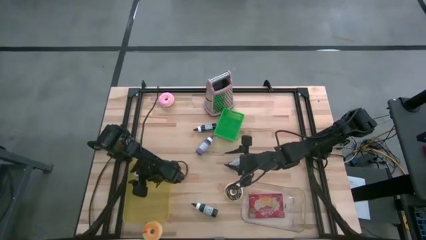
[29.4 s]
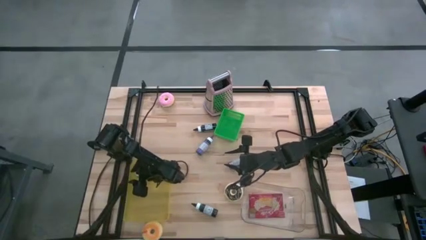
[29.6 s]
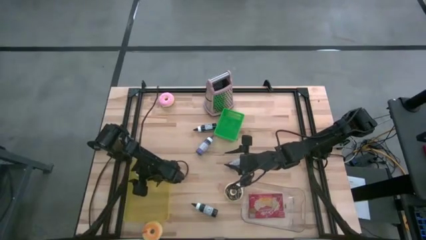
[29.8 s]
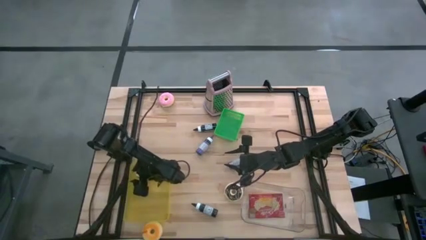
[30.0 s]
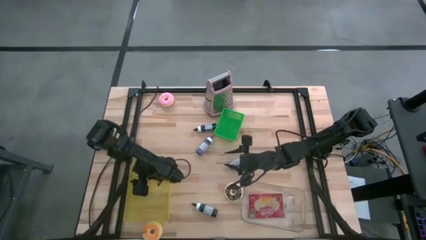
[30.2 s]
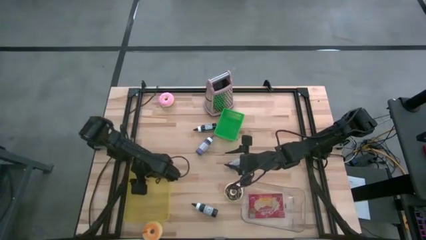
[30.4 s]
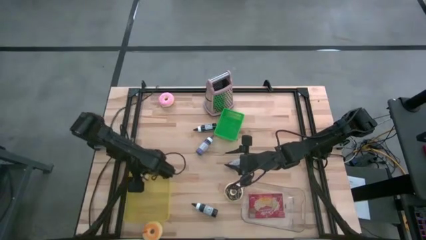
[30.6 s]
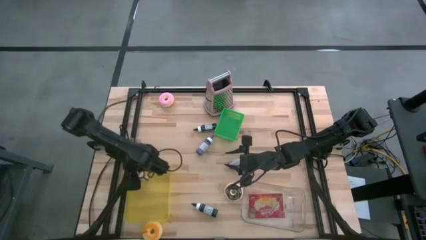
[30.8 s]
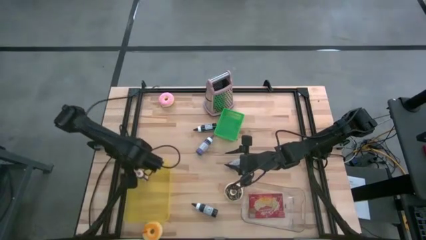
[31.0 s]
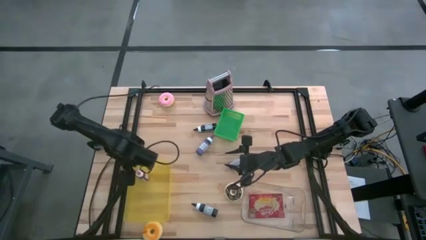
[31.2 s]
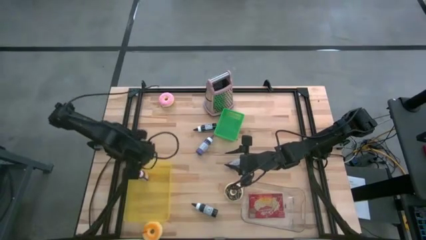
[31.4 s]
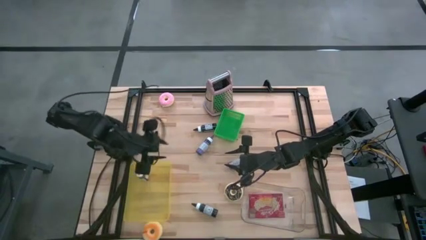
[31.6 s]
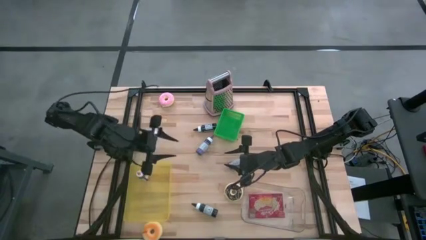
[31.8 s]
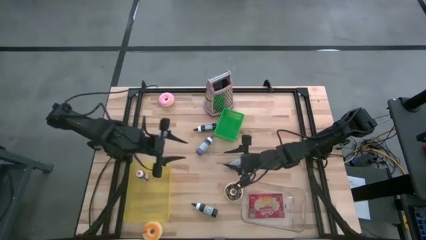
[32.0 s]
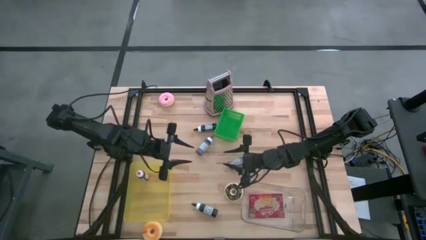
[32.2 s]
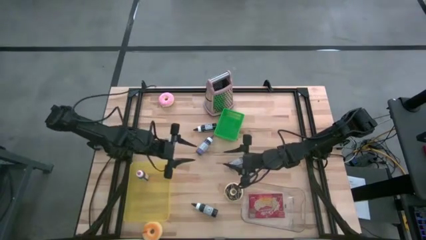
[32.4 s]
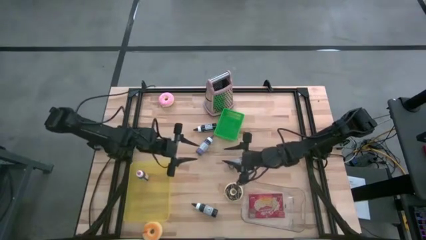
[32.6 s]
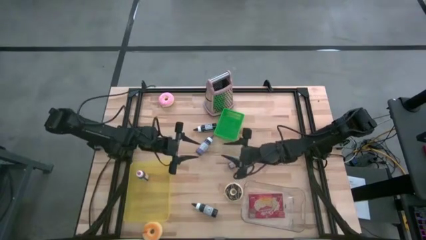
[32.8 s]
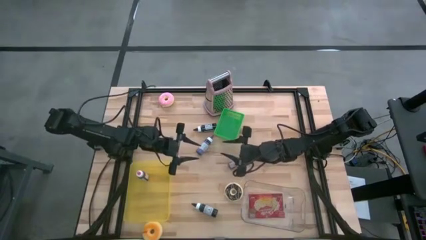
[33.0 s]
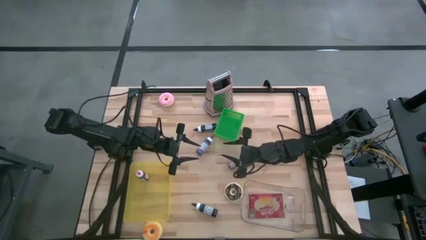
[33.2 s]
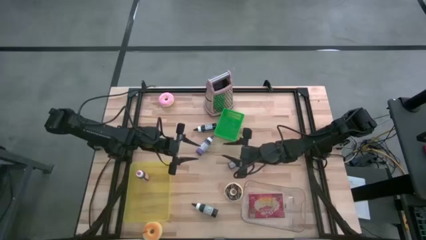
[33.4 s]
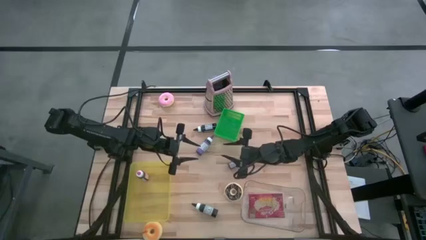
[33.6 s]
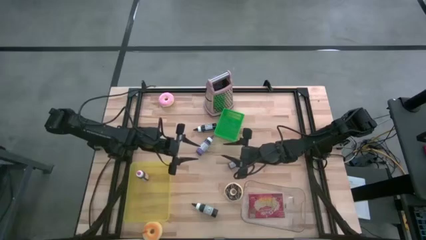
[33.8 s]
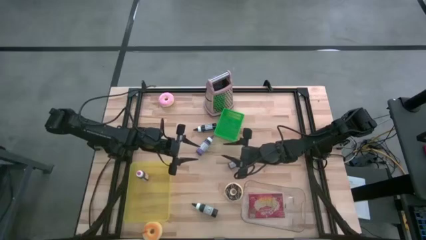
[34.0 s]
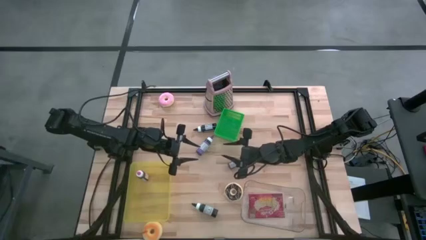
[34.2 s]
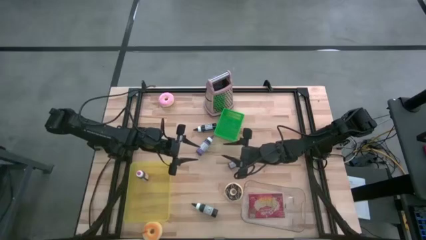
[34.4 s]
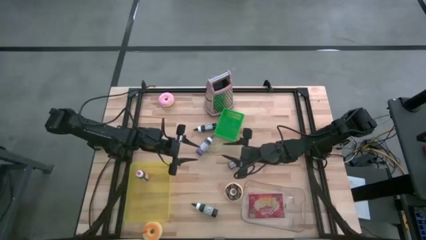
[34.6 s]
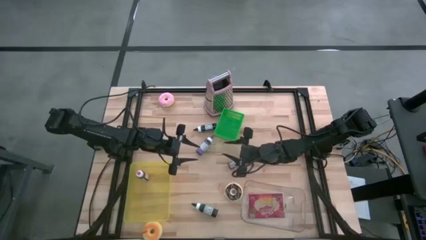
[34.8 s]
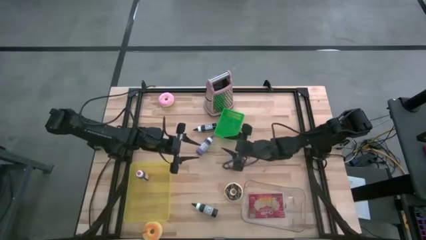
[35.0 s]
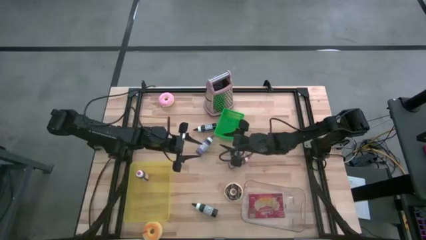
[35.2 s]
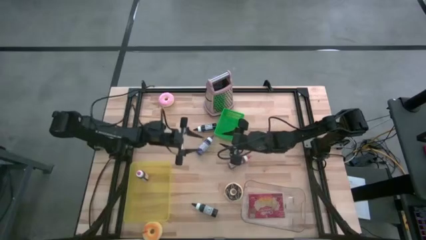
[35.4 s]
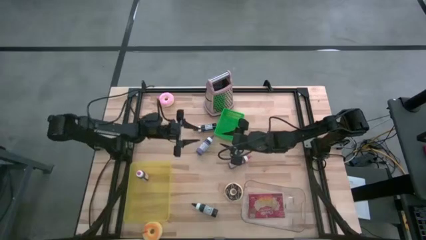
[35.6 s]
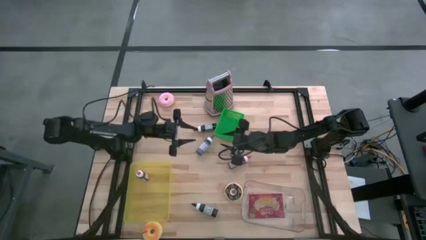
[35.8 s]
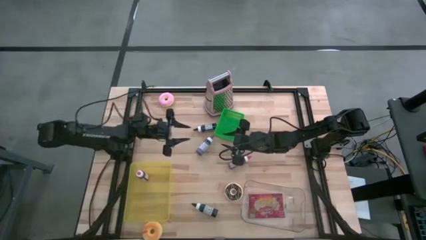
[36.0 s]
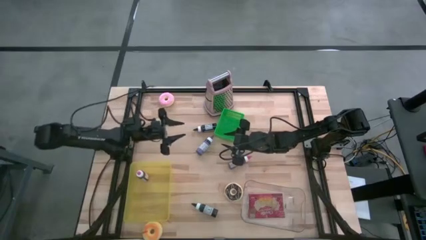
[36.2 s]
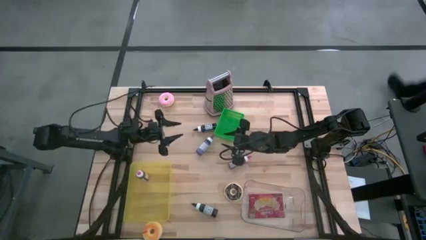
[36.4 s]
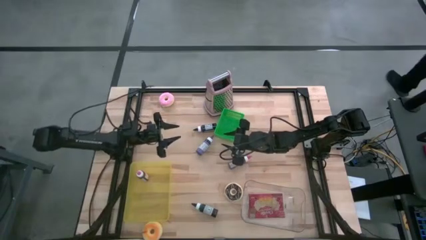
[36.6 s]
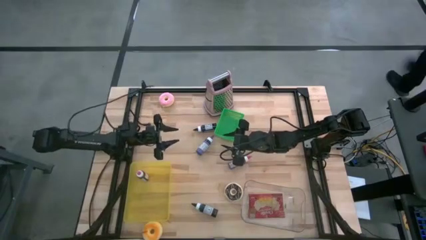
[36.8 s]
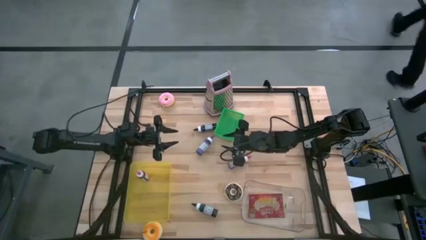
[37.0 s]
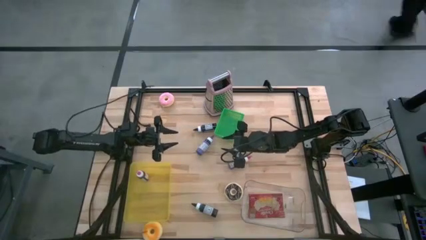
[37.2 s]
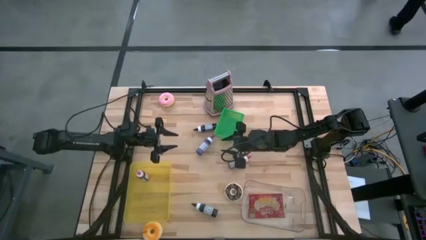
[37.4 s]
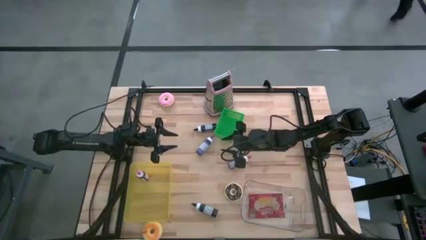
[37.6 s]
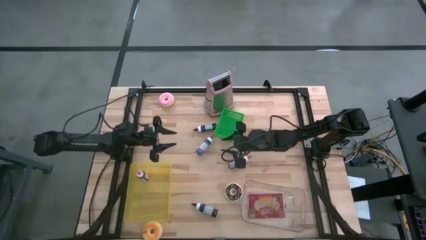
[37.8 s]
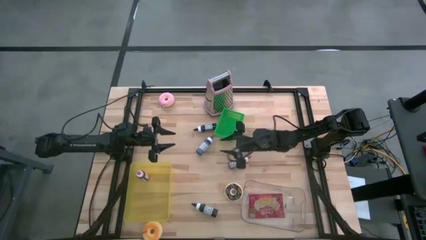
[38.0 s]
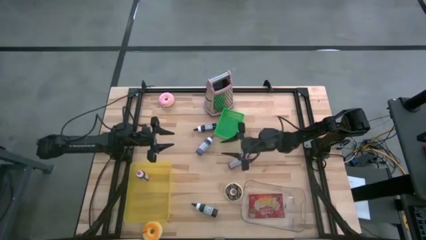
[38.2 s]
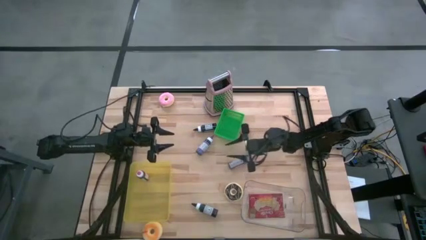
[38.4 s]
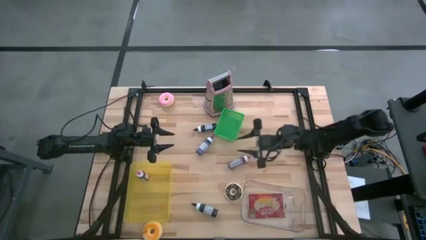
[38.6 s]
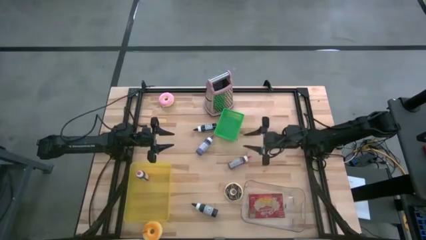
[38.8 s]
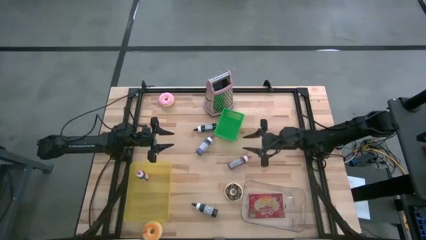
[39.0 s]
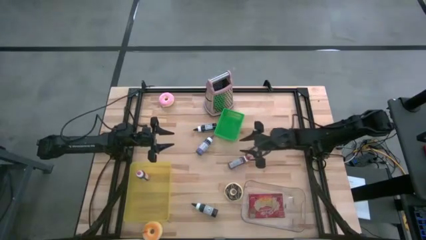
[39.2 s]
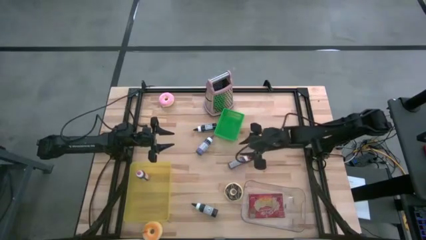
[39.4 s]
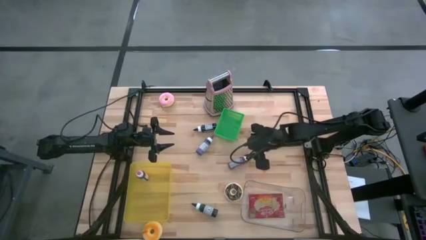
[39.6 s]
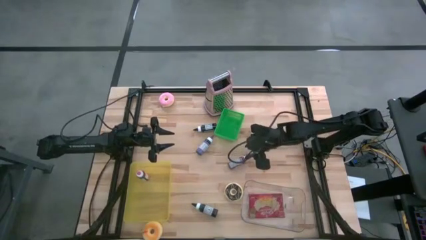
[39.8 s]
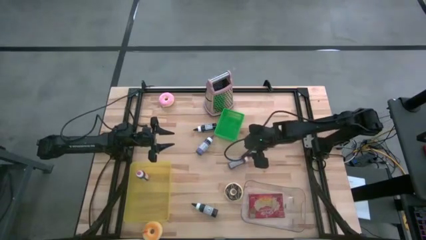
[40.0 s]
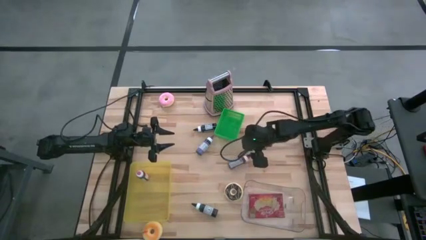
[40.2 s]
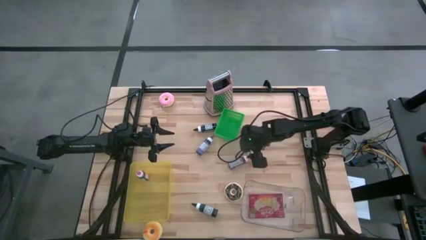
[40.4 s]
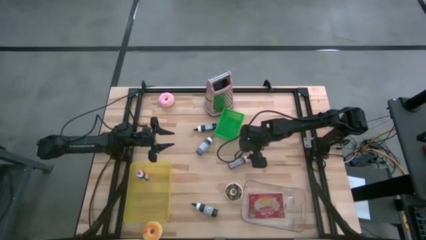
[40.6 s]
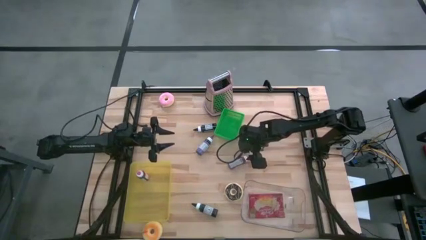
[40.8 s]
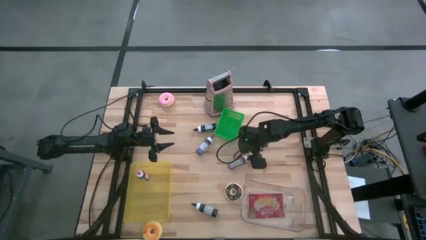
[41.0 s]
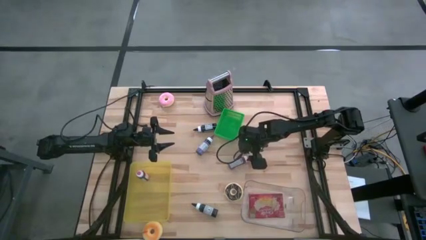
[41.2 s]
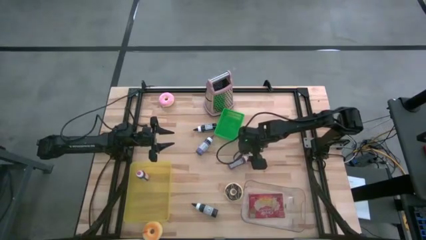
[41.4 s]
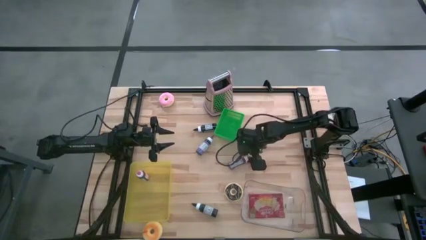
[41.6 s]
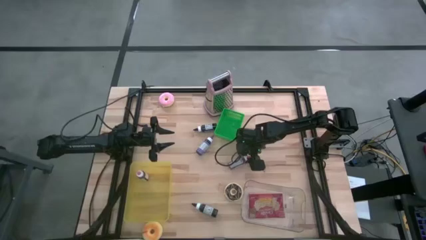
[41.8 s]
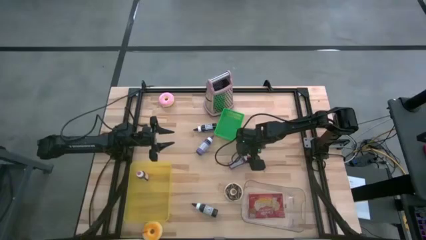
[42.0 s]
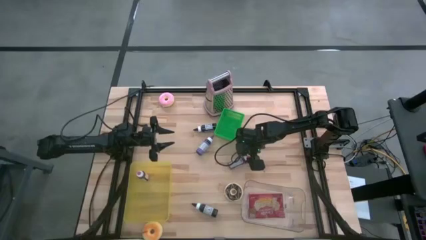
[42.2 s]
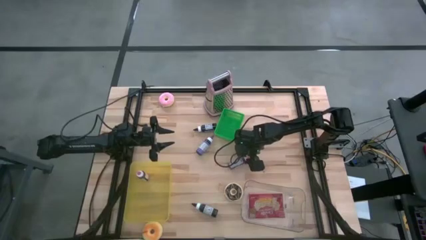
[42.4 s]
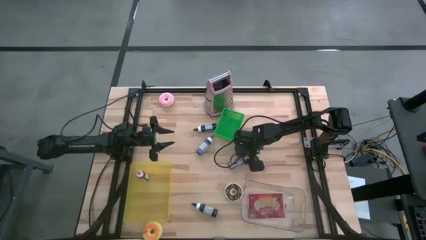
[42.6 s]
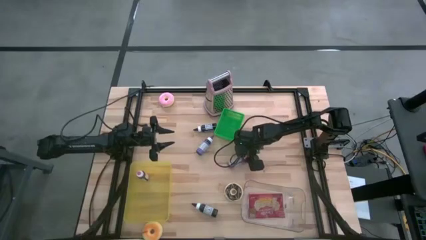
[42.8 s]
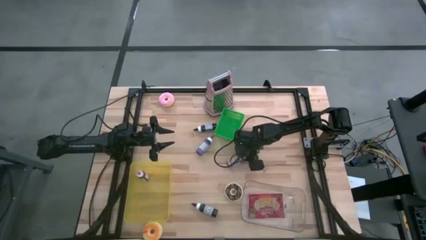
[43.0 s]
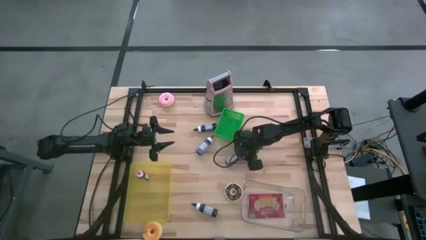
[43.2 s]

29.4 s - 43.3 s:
Task: Pick & Place Food Item
Put the red ink bottle into the yellow bin

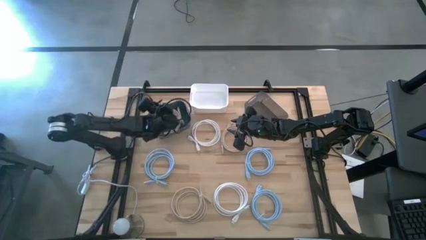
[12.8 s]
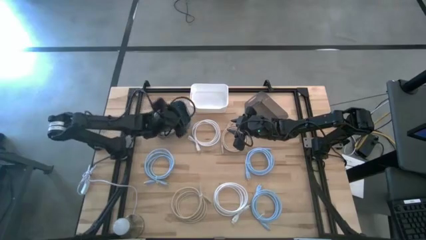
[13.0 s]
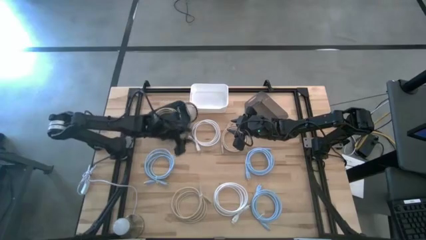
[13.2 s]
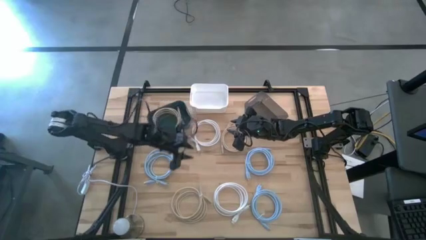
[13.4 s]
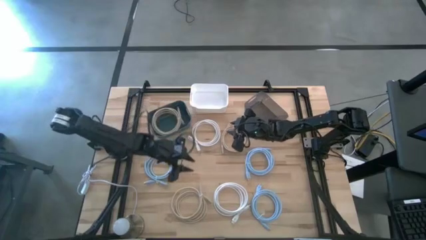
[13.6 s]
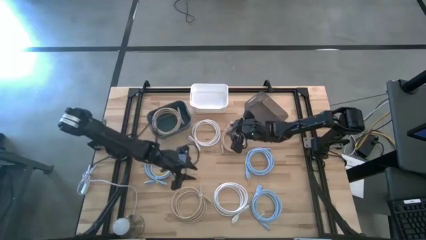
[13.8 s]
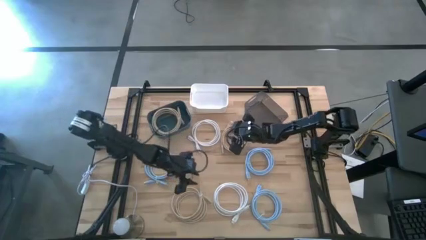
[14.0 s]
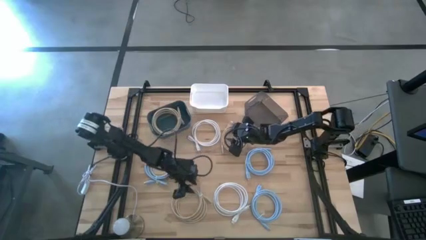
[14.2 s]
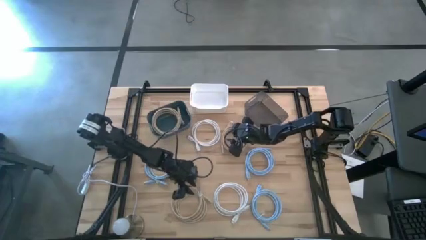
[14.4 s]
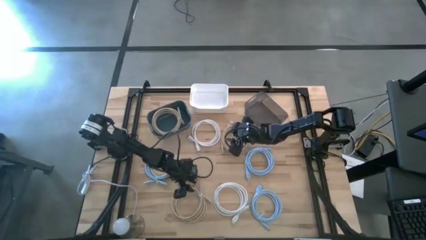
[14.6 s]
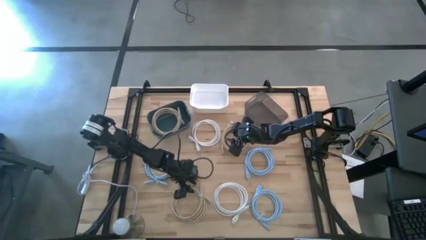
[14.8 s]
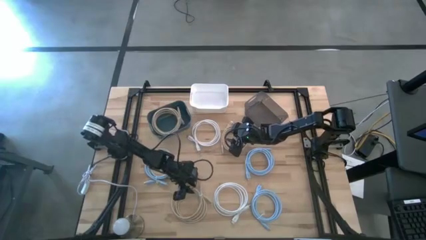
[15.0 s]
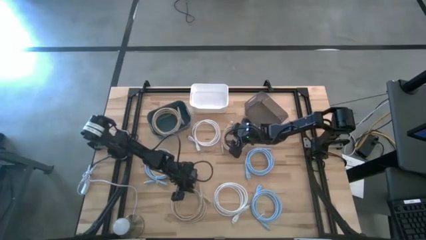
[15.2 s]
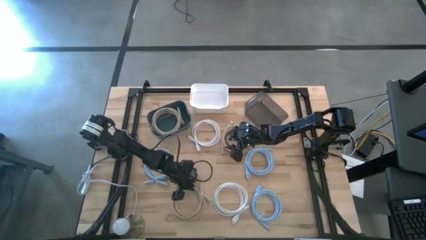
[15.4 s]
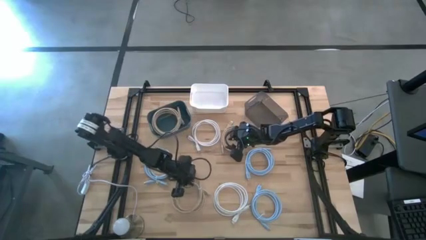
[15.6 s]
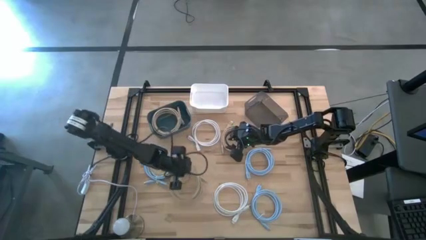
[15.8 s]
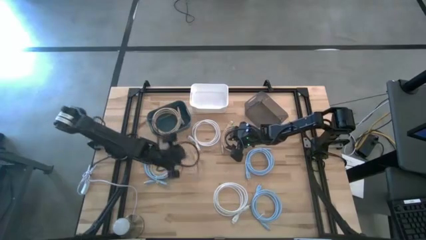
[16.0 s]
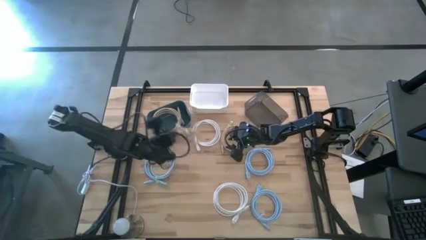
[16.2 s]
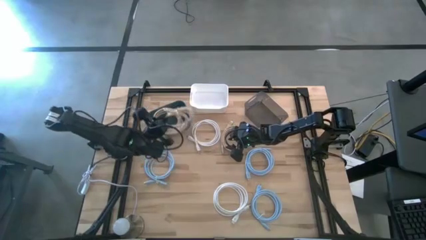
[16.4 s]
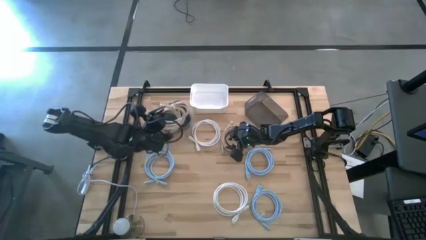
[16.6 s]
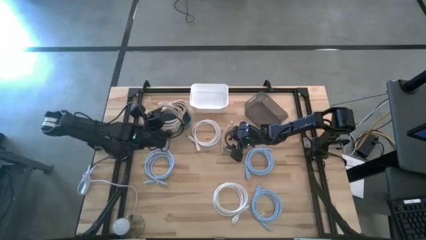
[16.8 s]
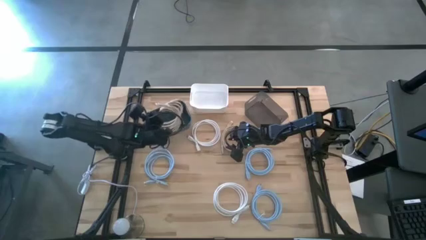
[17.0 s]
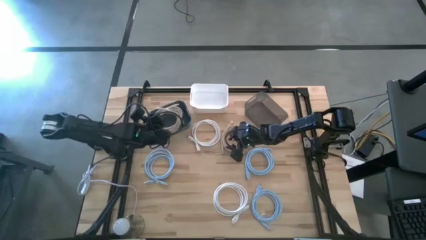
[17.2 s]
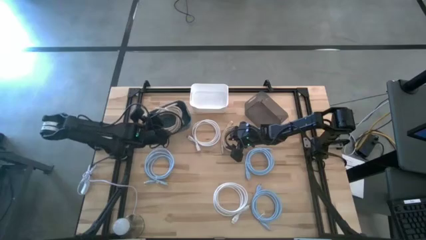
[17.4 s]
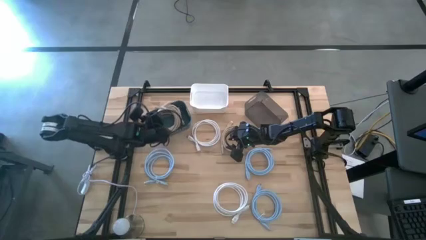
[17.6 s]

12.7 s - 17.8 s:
Task: Sort HDMI cables
Put the bottom light brown HDMI cable into the blue bin
